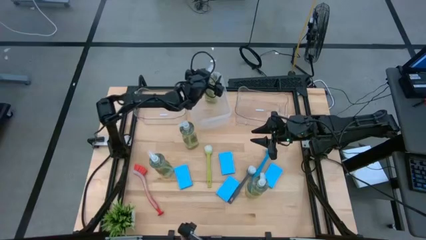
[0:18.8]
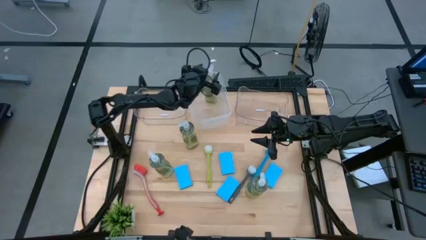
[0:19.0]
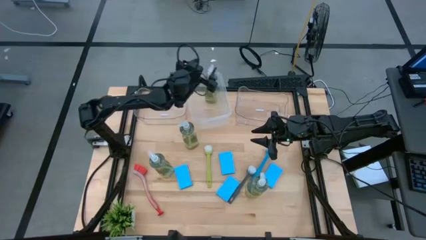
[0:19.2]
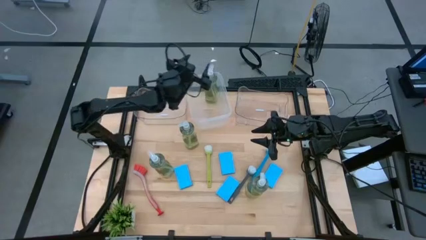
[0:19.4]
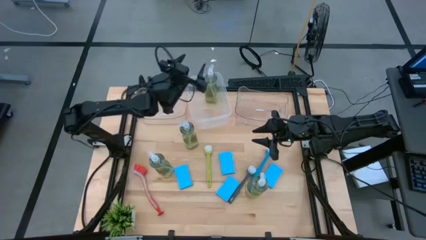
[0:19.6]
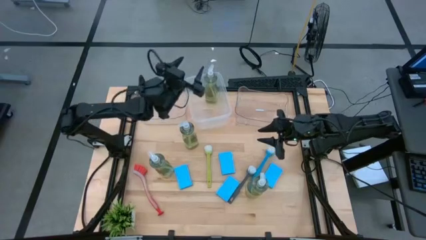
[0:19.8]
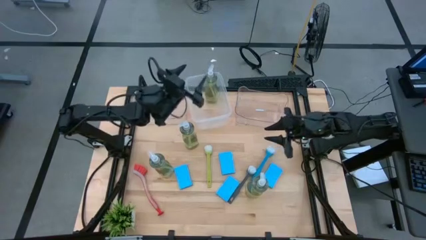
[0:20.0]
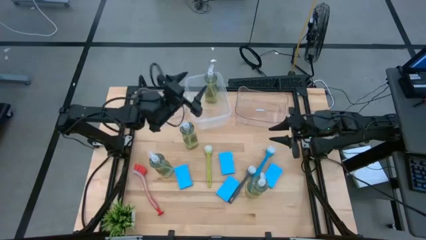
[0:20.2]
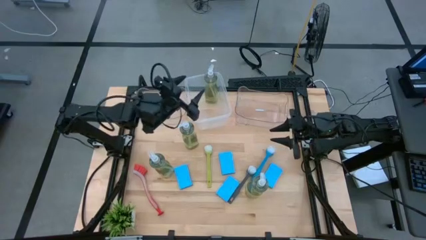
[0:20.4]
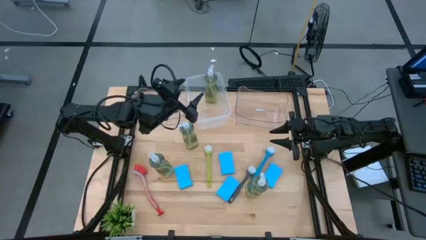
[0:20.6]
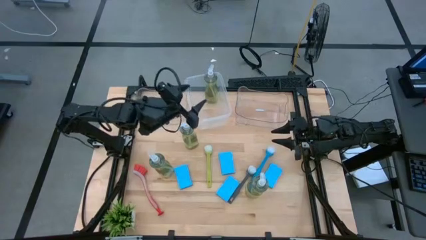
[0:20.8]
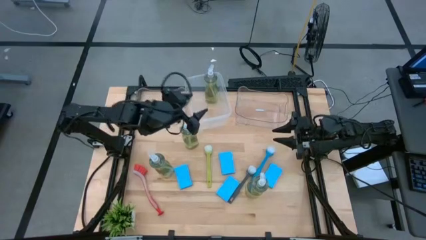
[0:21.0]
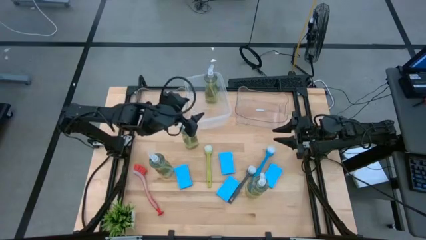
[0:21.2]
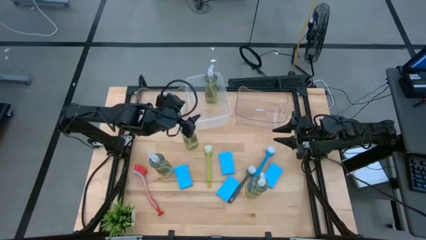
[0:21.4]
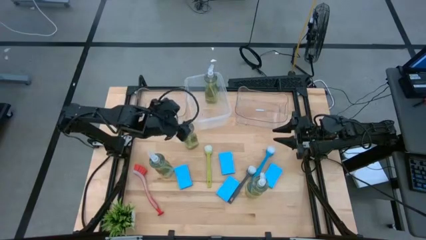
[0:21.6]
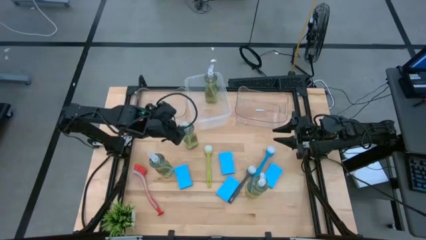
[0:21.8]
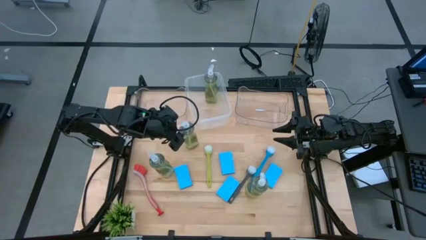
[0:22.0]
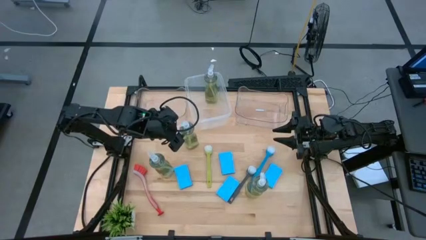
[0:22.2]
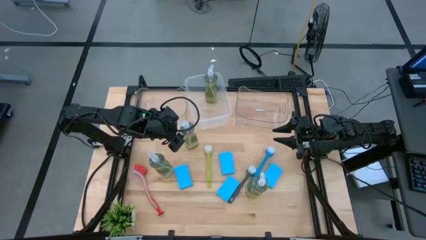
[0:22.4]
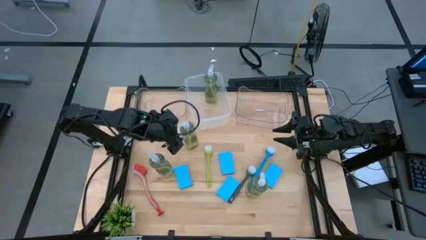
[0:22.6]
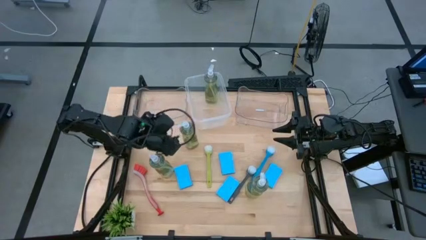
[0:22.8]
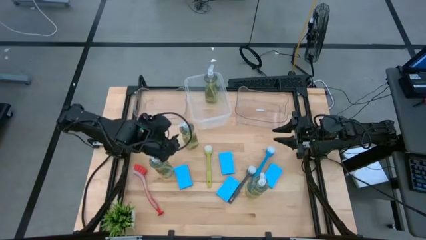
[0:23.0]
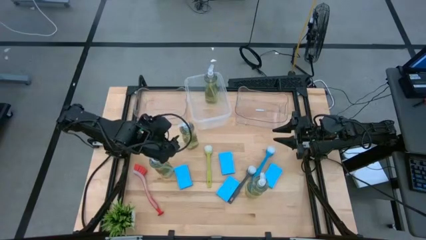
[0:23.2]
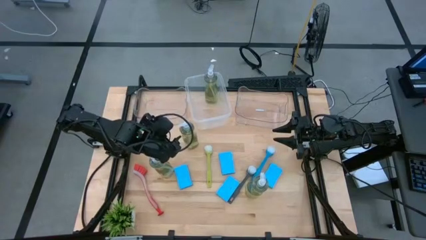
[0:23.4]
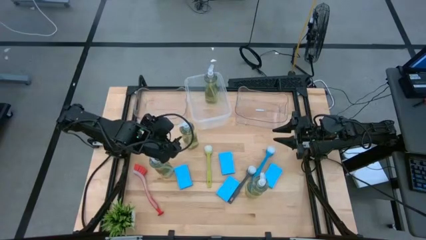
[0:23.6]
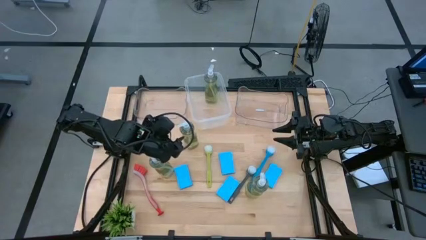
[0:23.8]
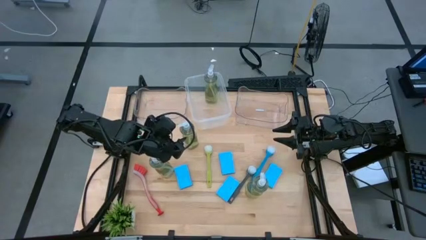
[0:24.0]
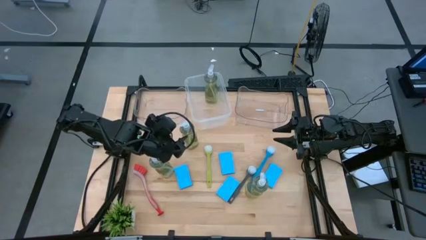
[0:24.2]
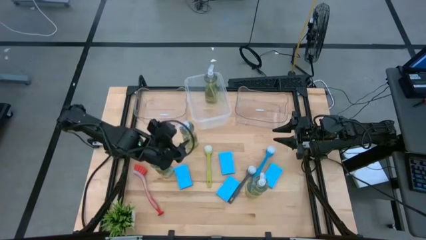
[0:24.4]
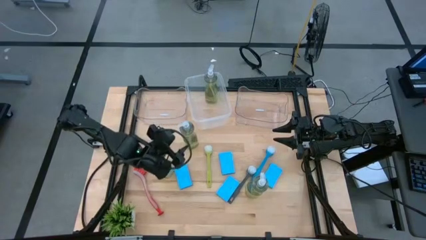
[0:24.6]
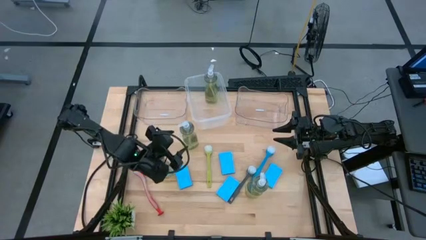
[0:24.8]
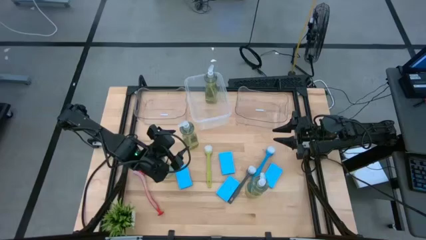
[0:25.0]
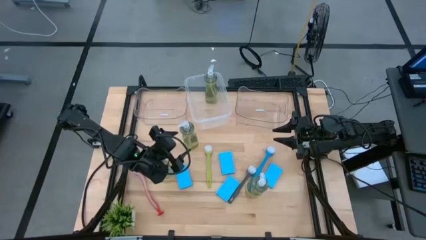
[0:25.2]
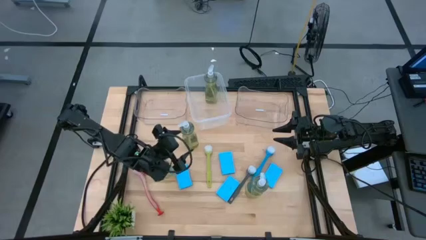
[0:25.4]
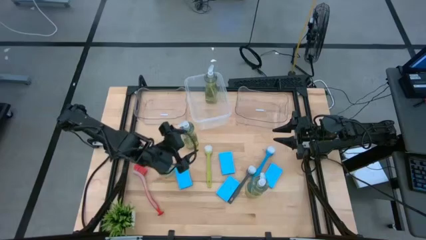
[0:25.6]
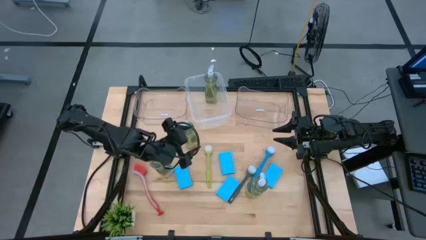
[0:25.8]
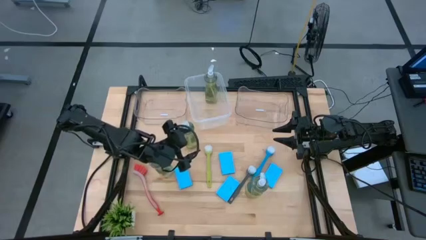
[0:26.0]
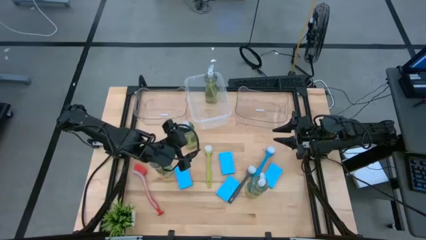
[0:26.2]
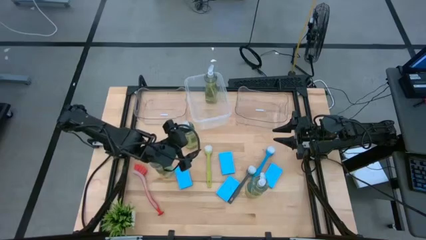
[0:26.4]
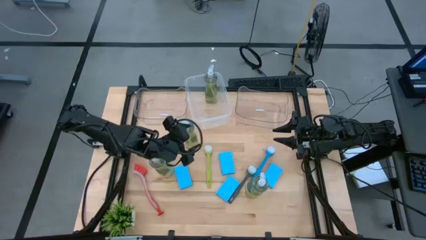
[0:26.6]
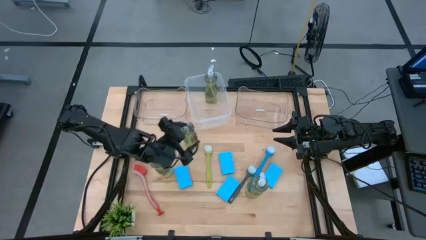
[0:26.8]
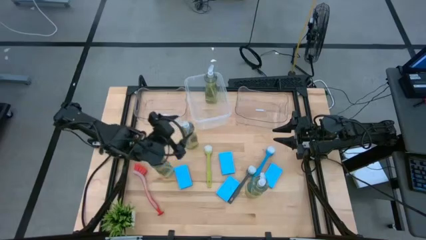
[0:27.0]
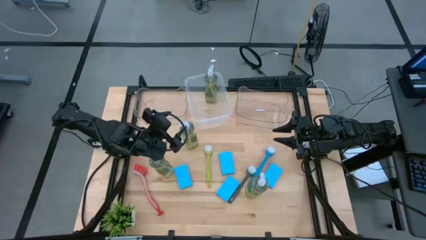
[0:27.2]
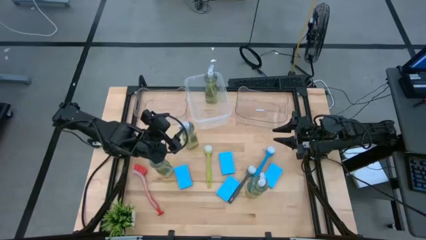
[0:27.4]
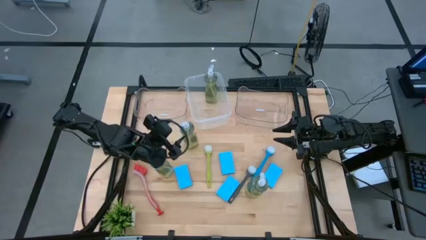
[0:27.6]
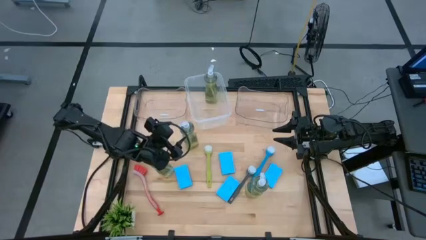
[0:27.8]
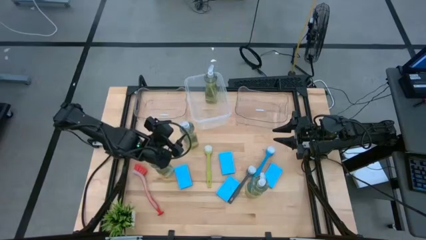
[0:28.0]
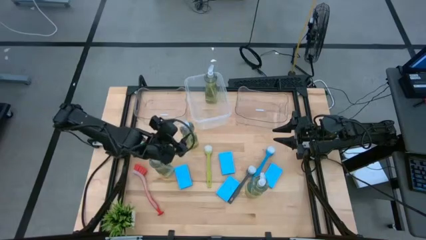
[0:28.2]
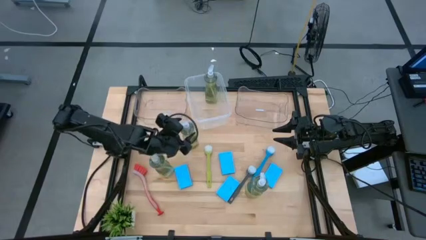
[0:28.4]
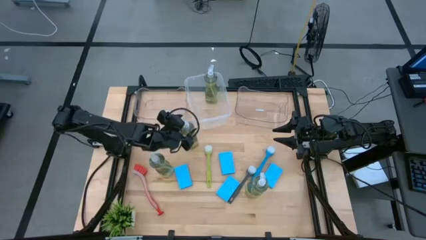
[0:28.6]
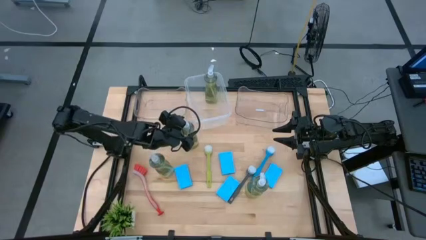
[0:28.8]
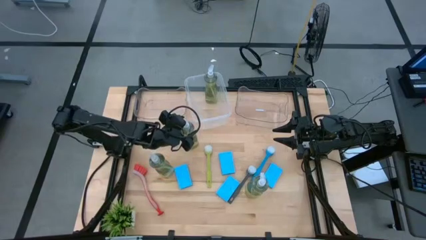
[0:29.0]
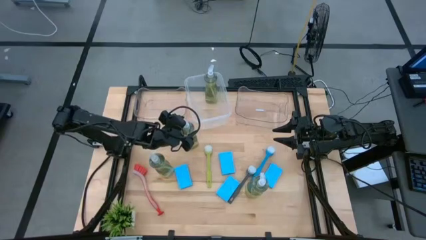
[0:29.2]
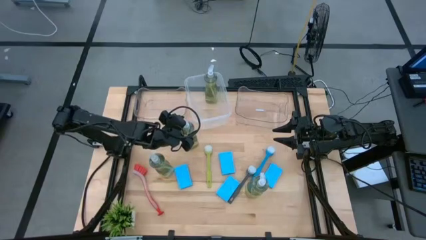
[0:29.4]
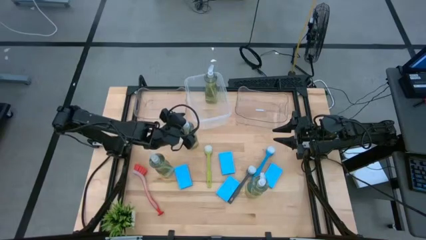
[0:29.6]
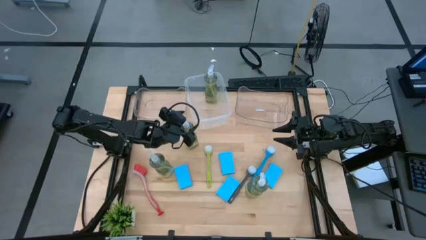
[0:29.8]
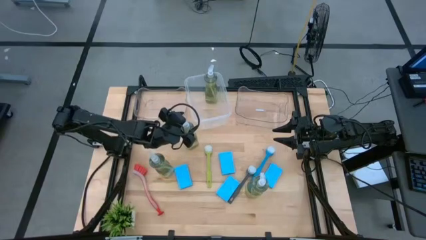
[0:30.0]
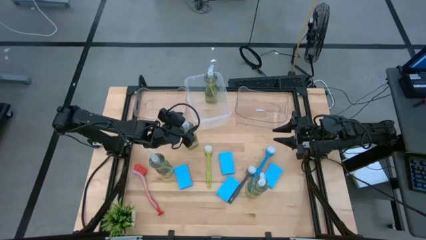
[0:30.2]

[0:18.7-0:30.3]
Task: Pick & Place Kitchen Sink Supplies
Put the liquid dishwashing soap into the middle transparent bin
